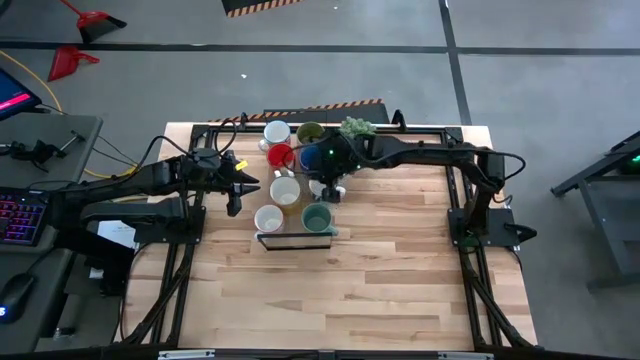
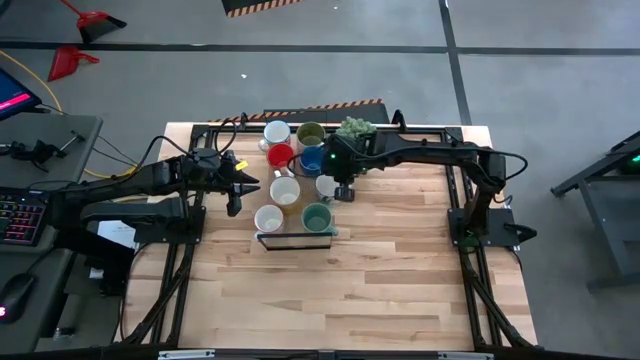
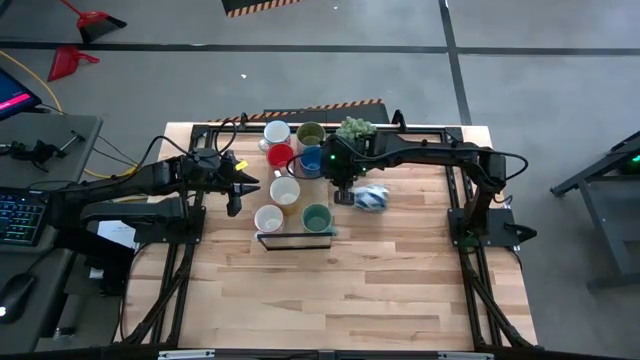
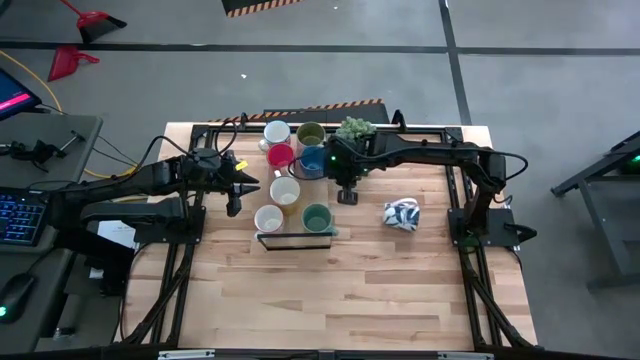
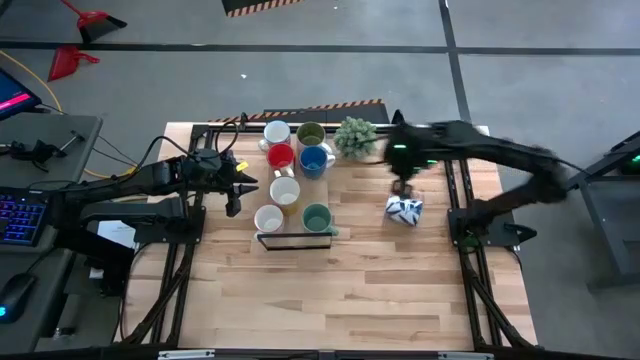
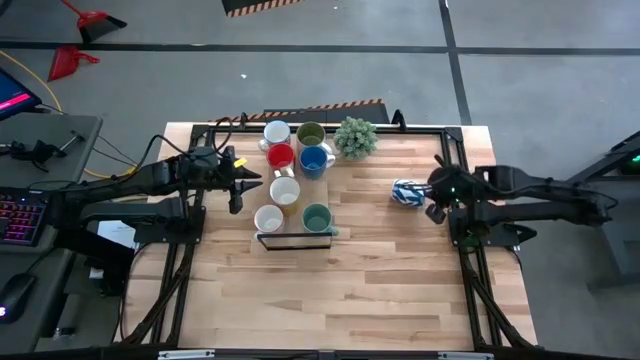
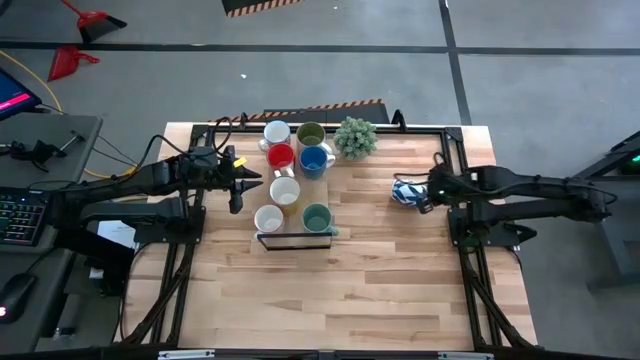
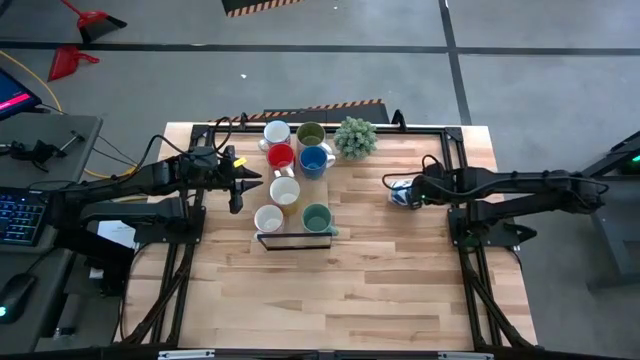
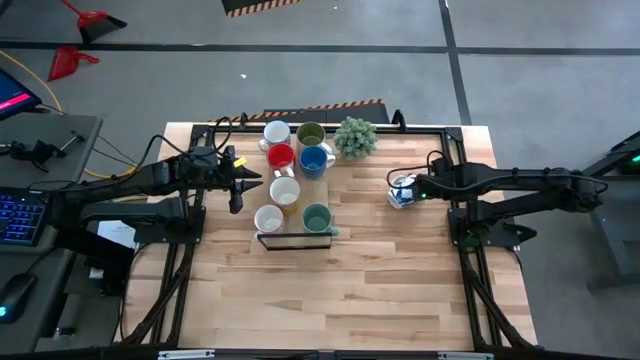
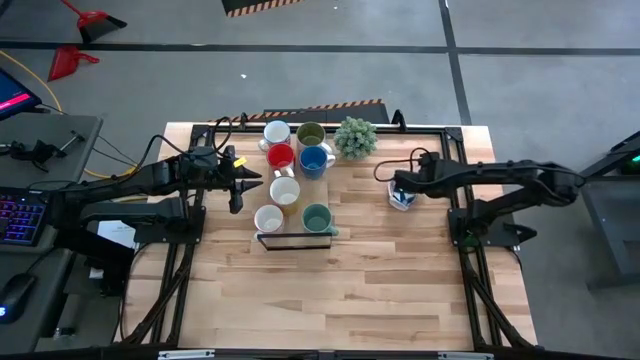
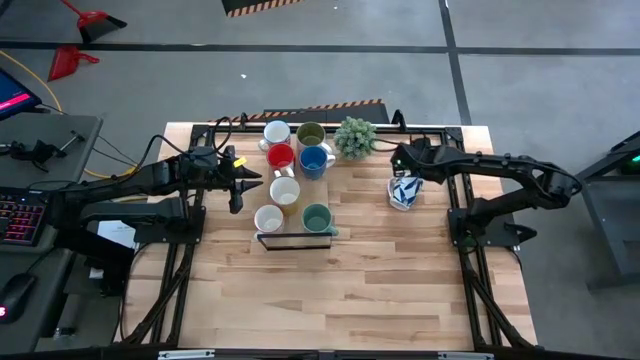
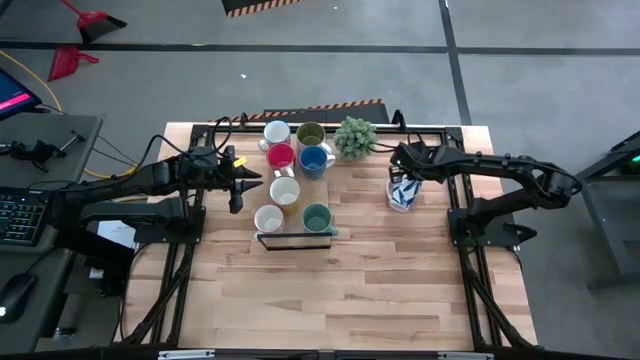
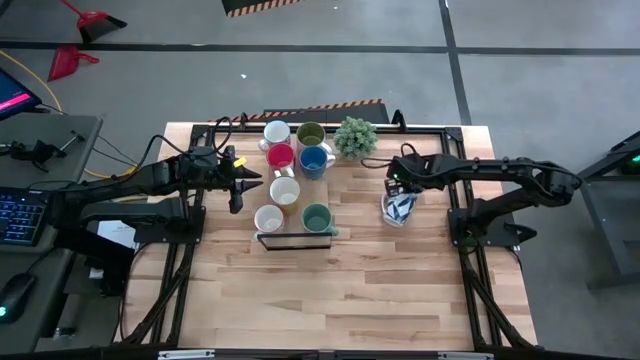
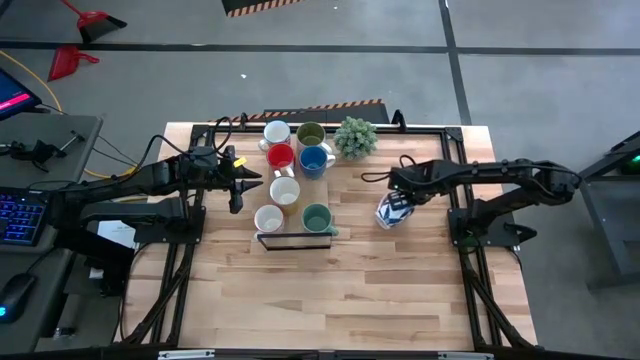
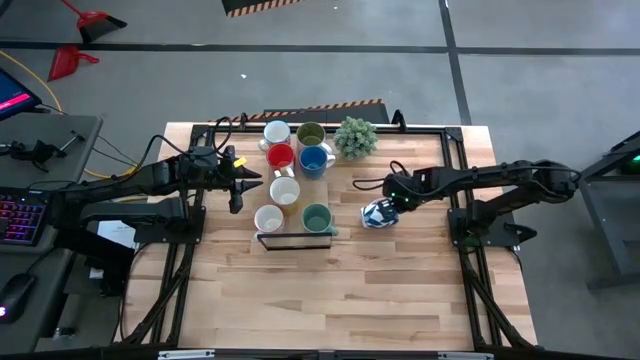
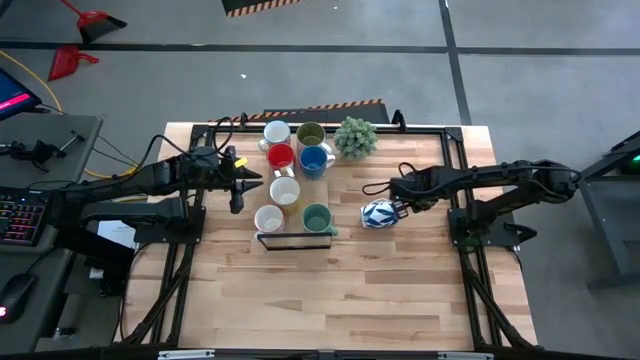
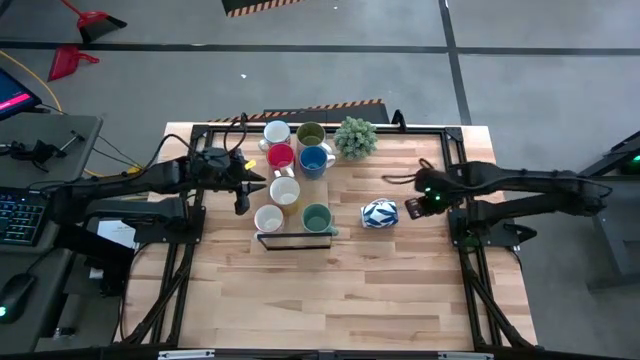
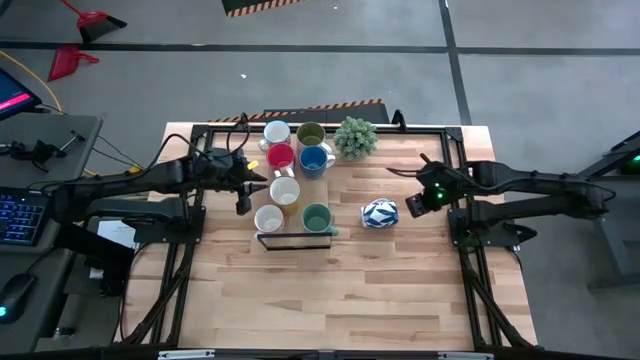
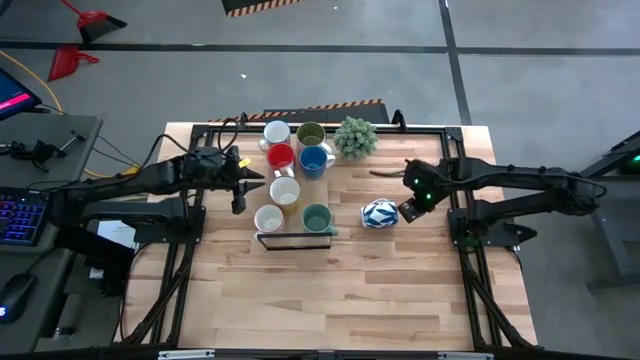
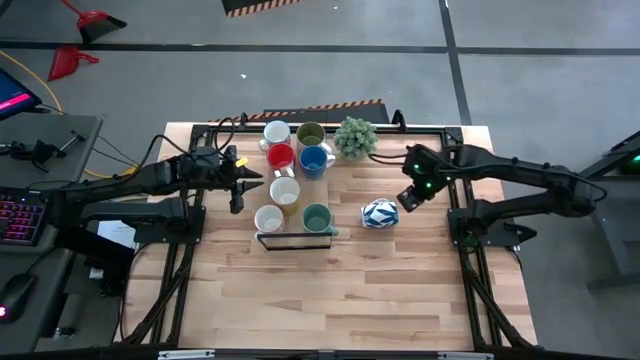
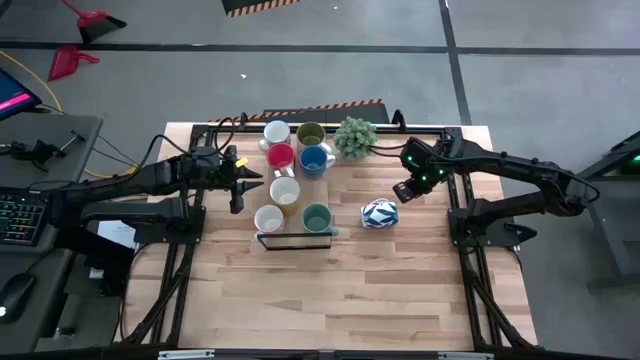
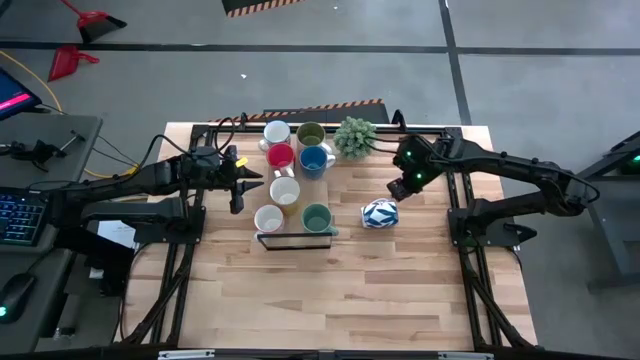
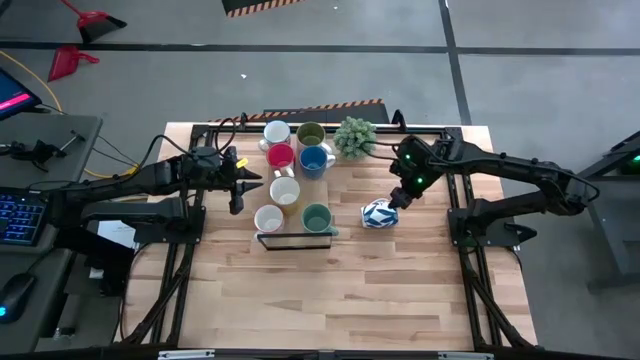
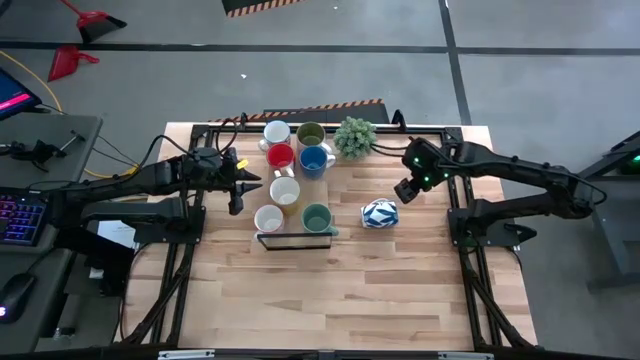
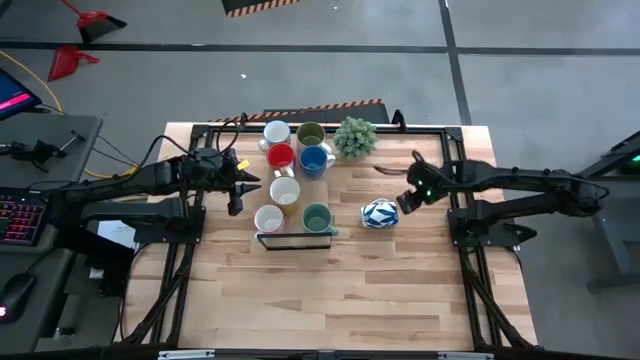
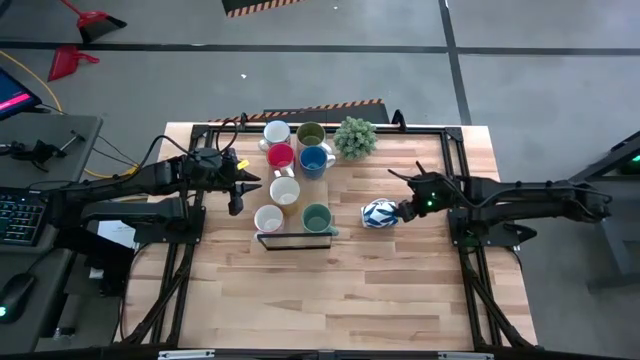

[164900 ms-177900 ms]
Task: Place coffee mugs
Put the blue patterned mug on the shelf

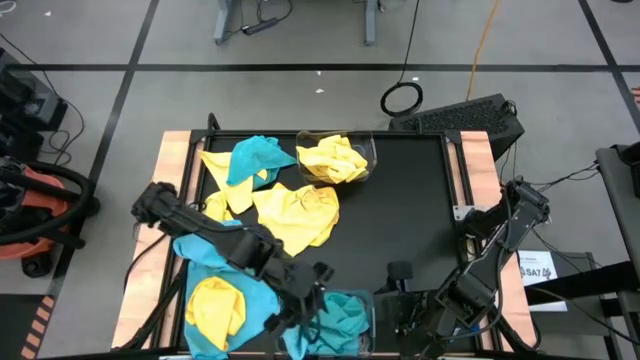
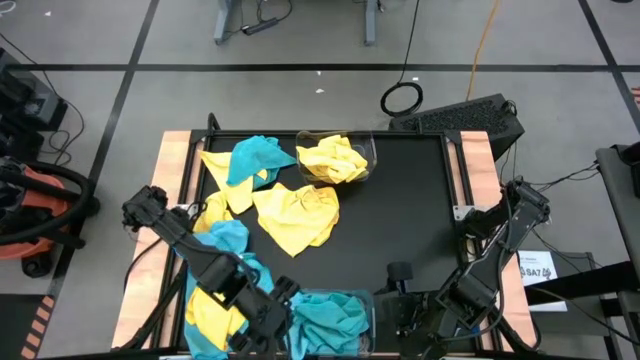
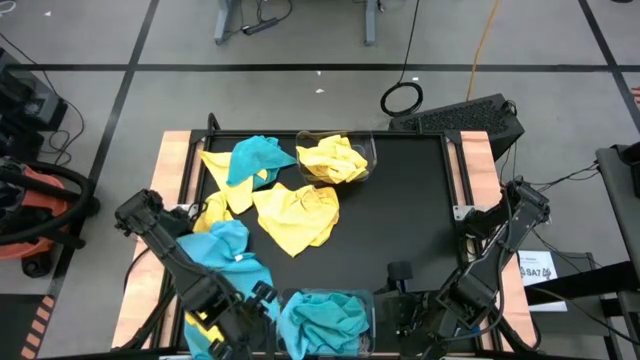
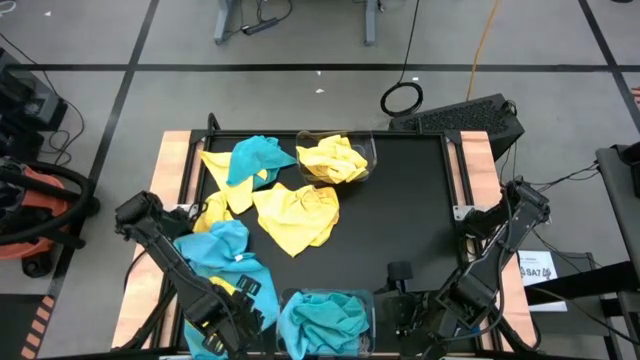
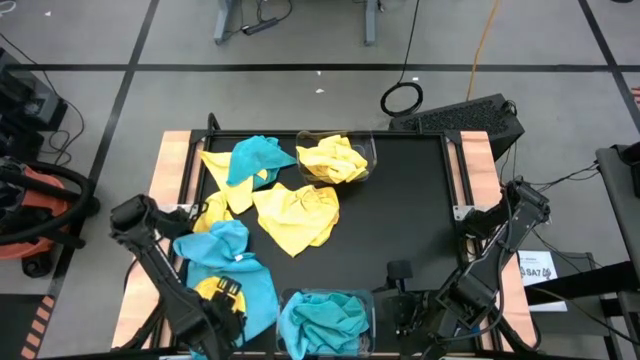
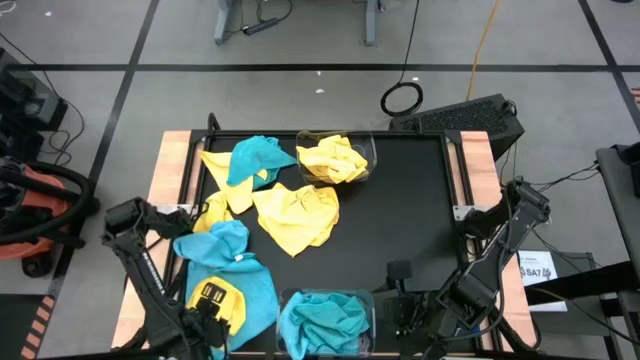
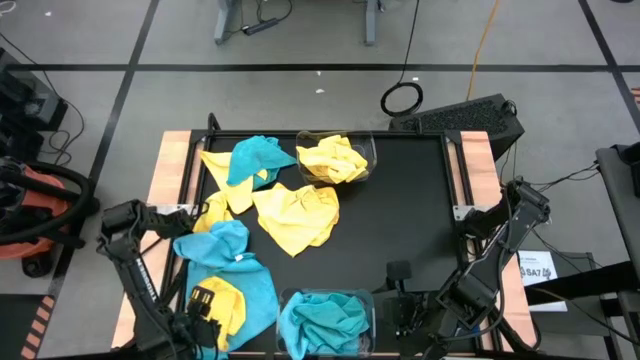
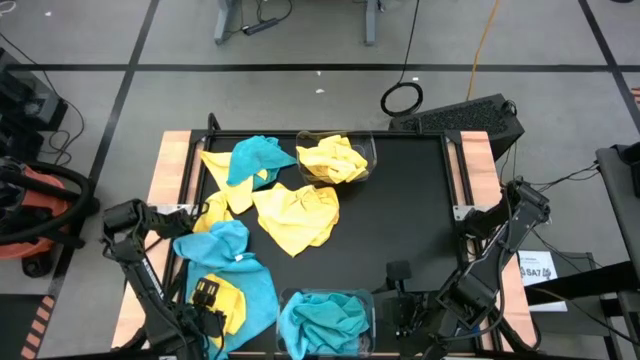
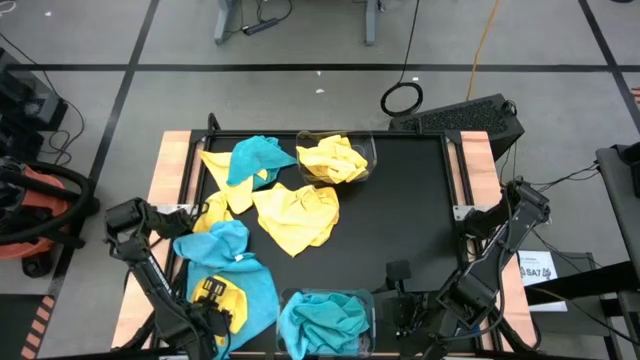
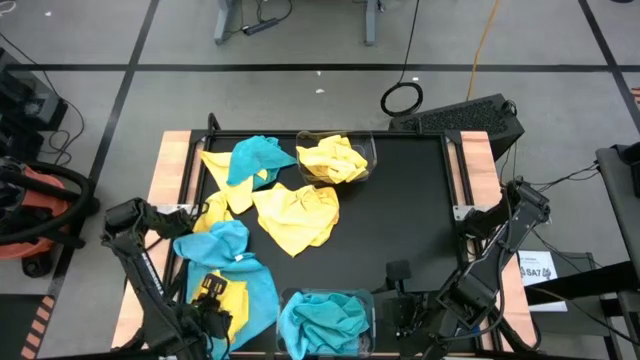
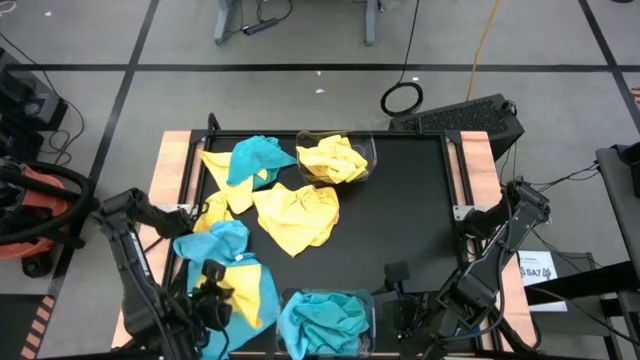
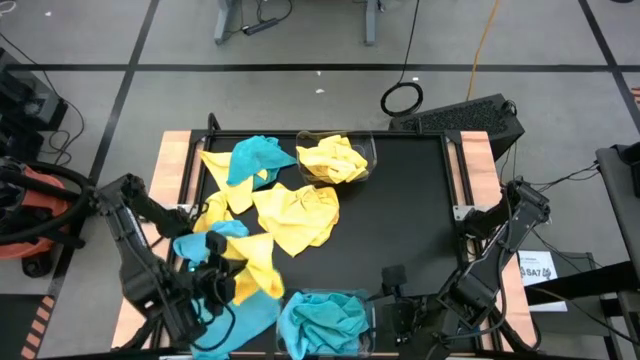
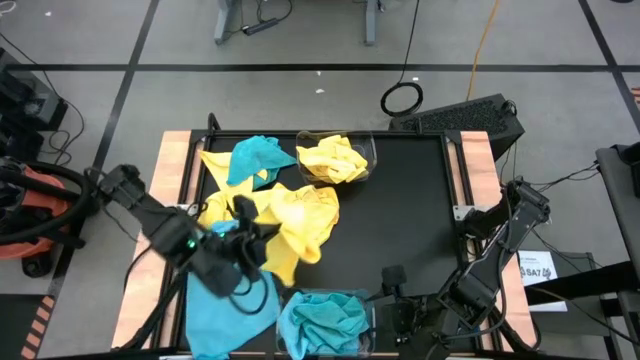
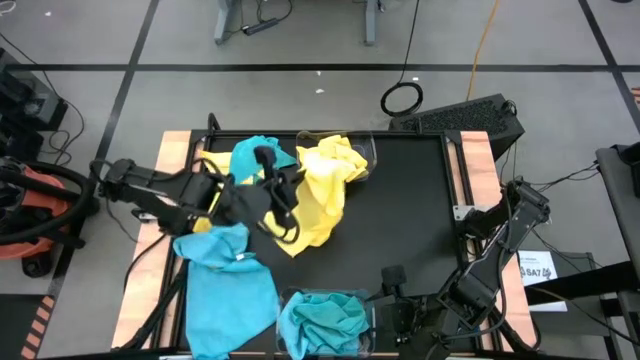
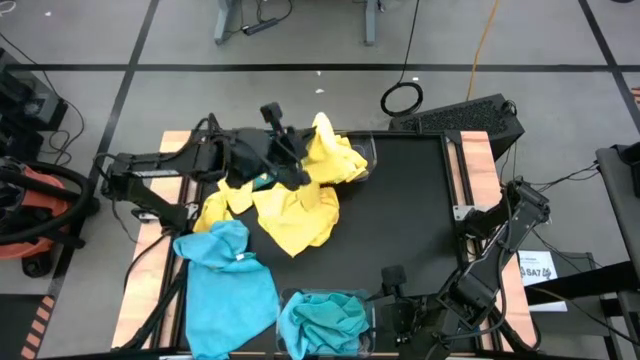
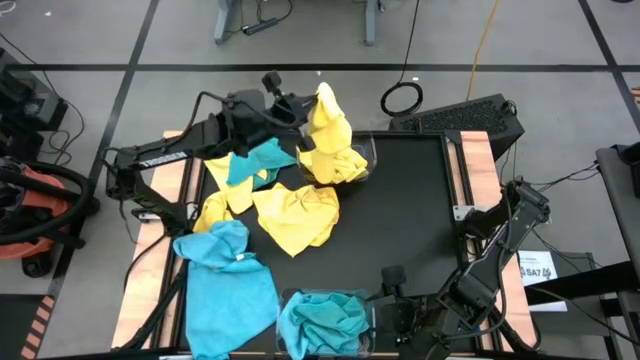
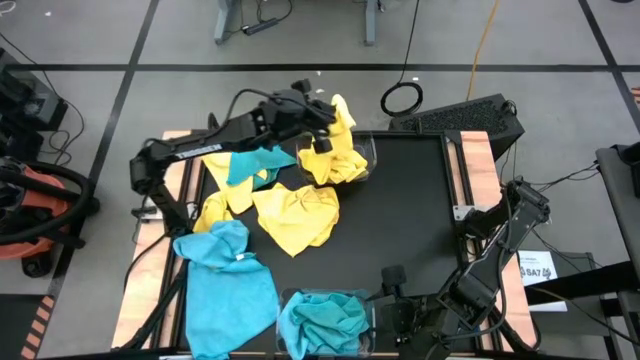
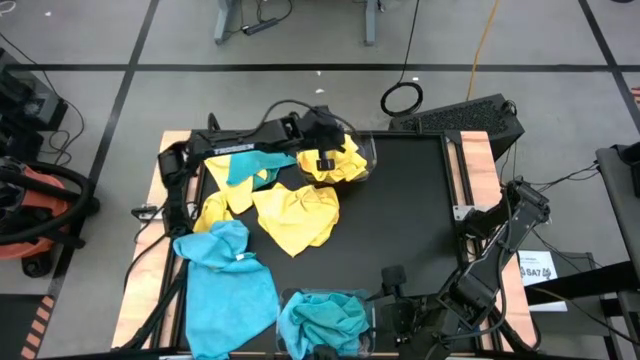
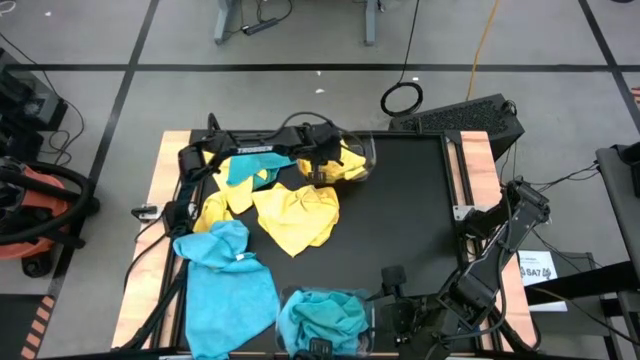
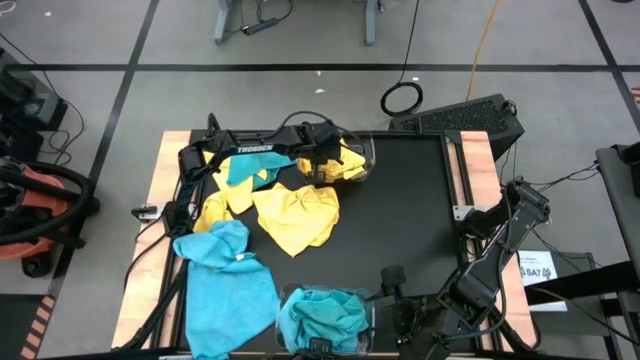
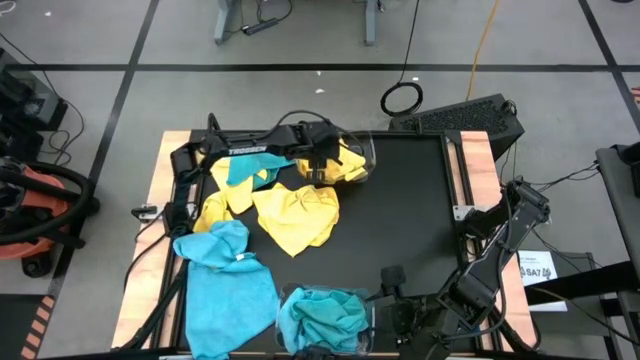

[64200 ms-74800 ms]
Task: Sort microfiber towel by color & place in baskets
Put the yellow towel into the top transparent bin
